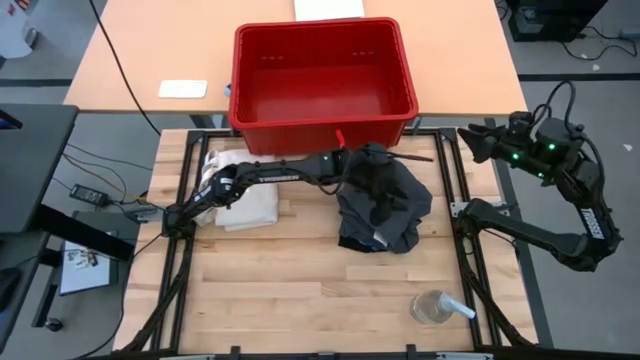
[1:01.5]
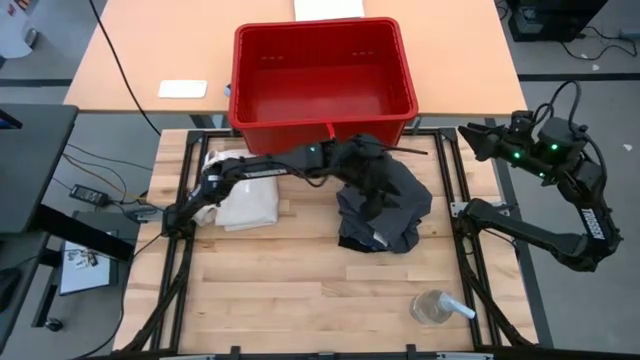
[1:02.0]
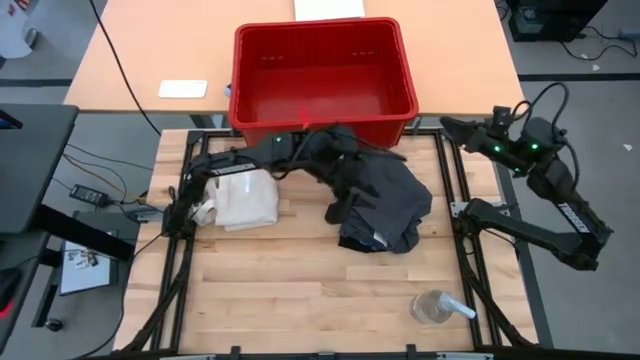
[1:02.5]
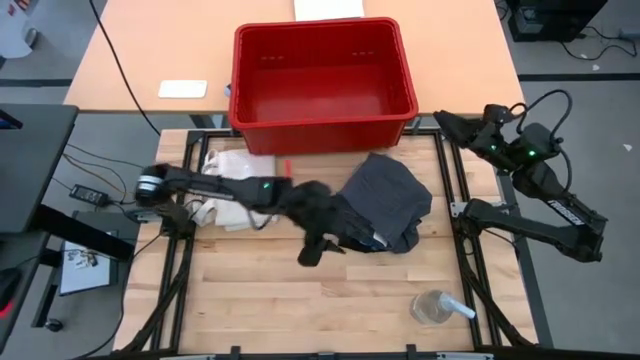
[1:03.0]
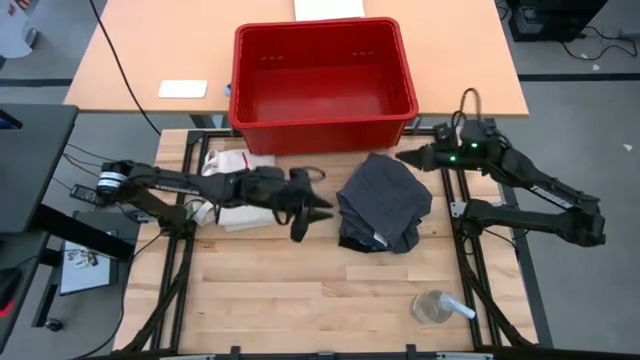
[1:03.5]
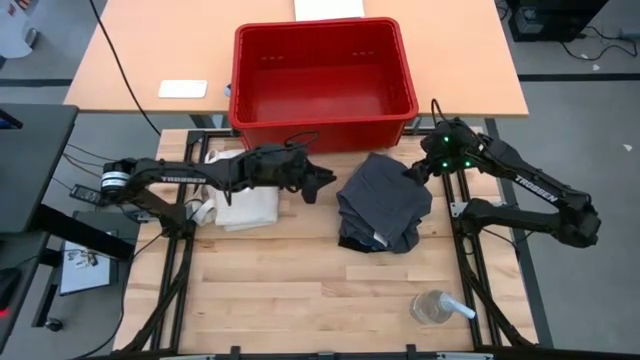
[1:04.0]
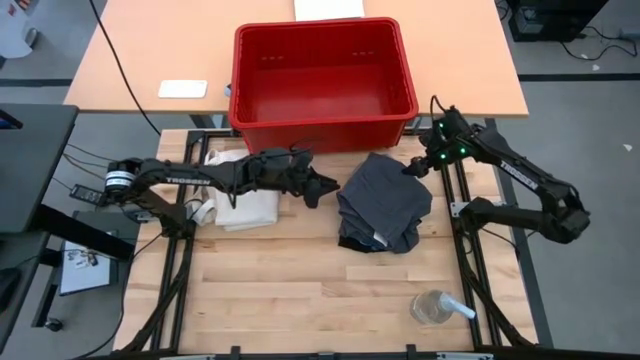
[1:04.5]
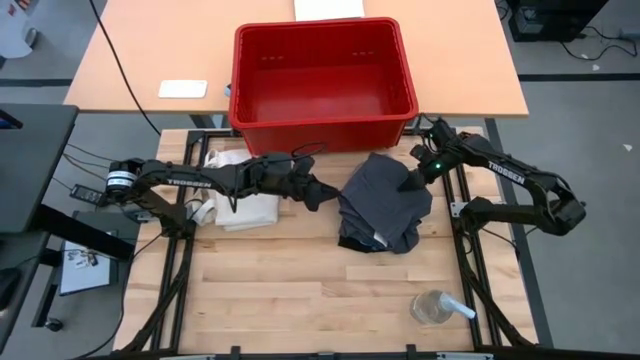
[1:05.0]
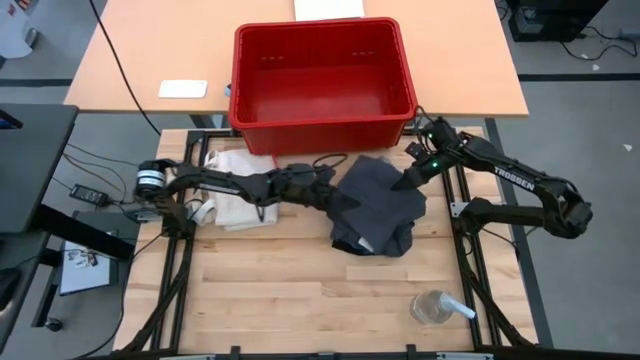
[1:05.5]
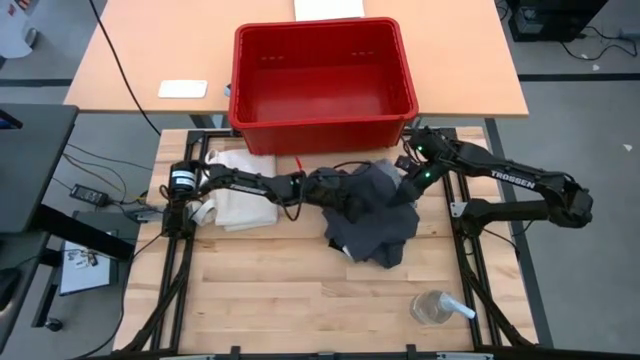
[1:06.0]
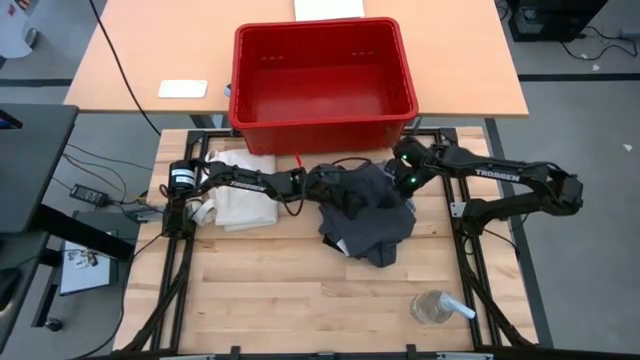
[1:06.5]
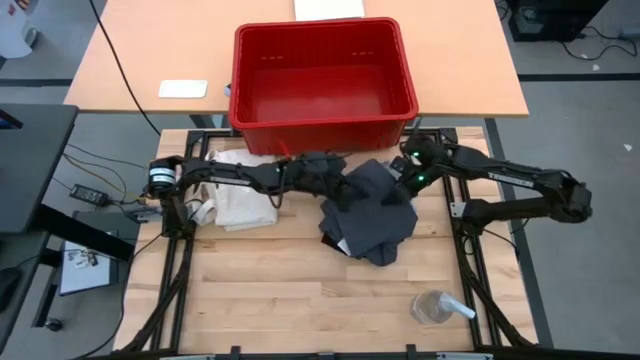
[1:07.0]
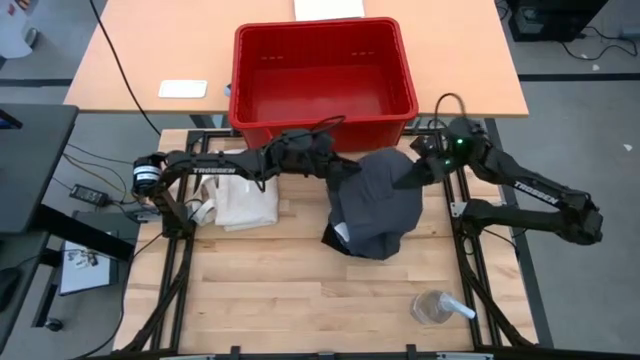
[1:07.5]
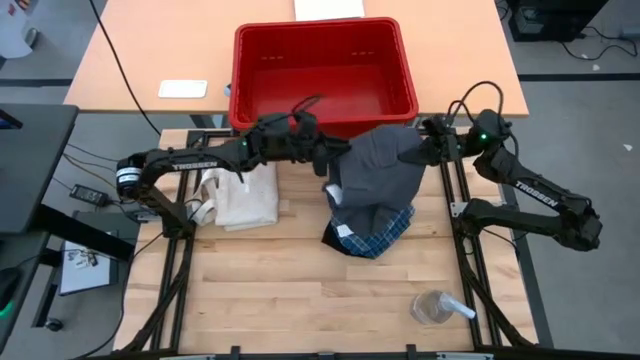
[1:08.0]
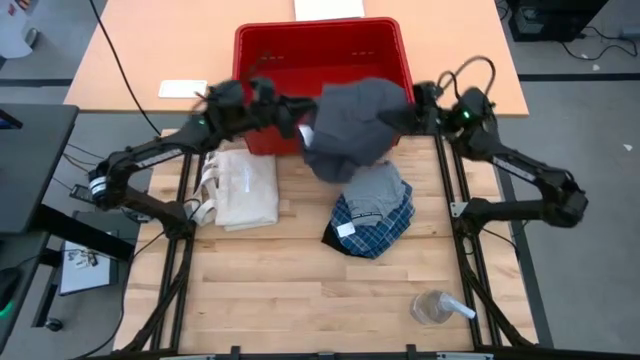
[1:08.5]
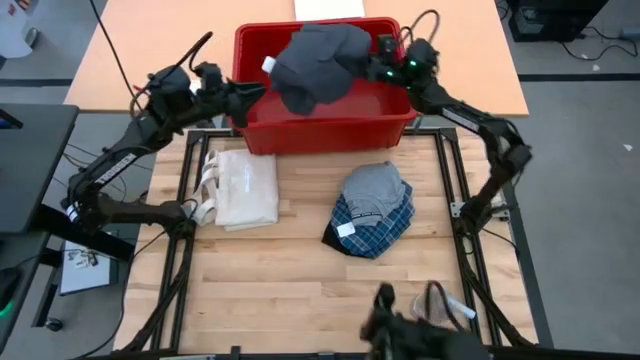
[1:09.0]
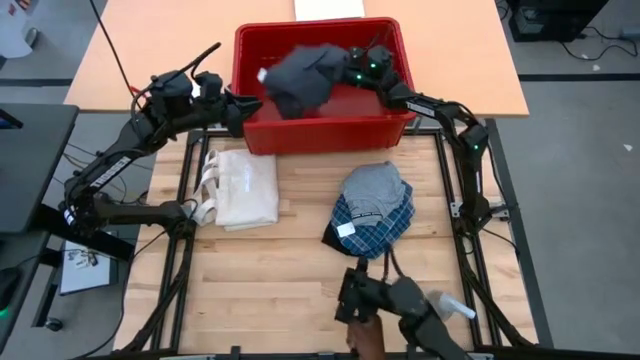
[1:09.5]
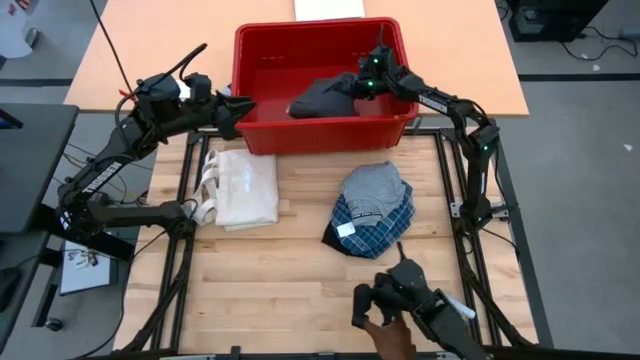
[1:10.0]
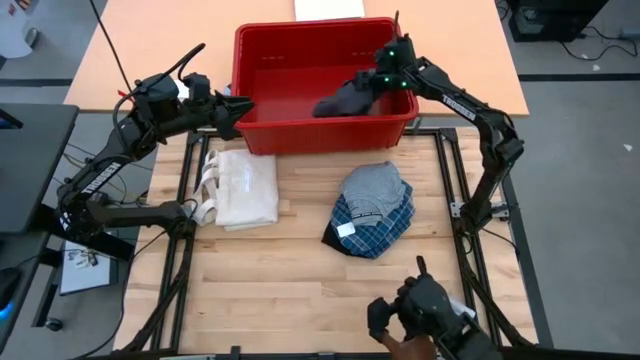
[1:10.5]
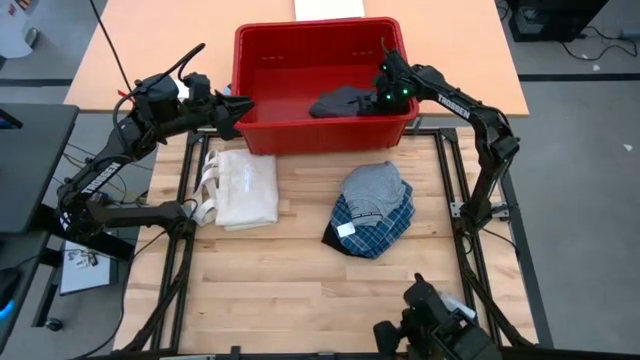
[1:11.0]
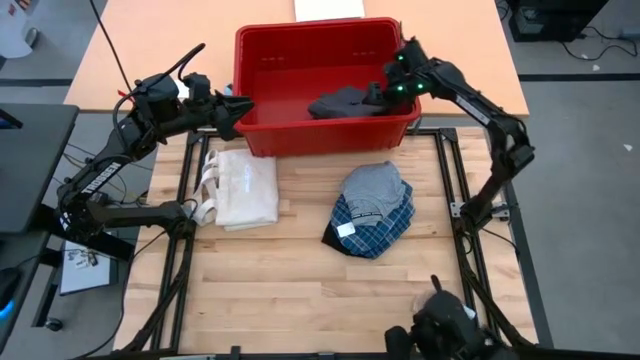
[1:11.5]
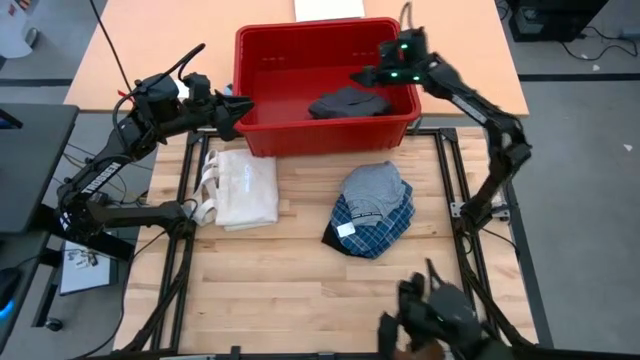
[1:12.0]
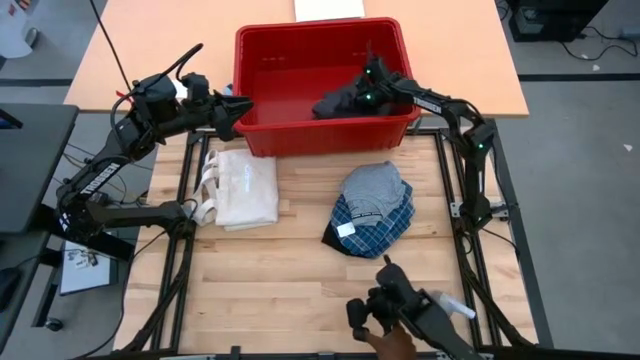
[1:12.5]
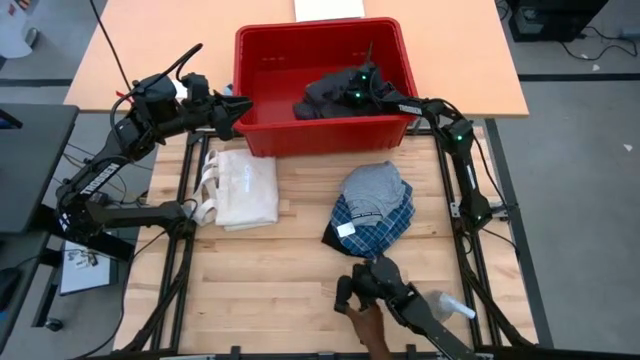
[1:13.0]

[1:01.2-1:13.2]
Task: Fold laundry
Put the gray shorts into the red laundry bin

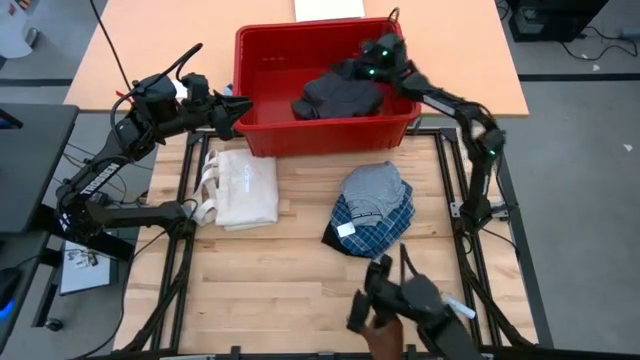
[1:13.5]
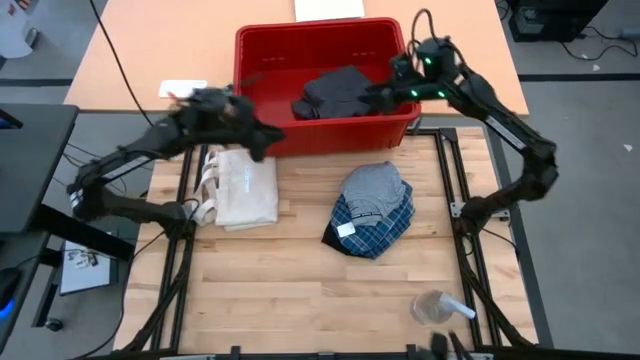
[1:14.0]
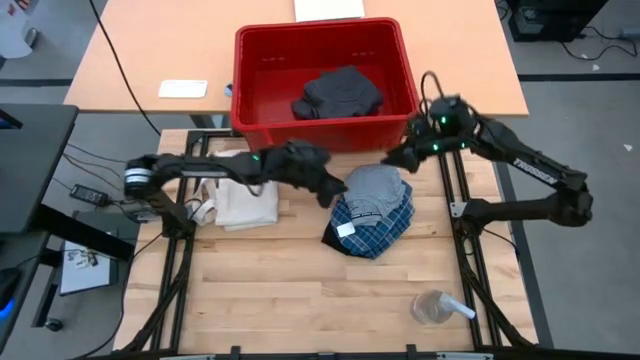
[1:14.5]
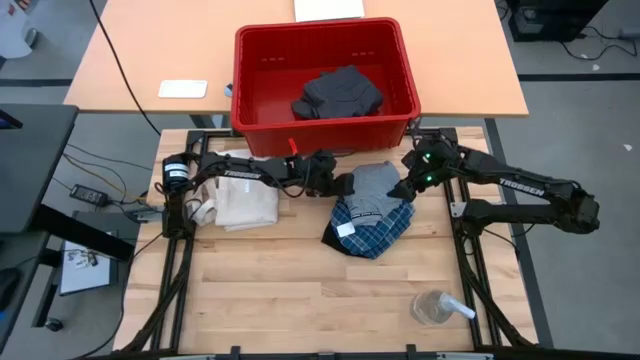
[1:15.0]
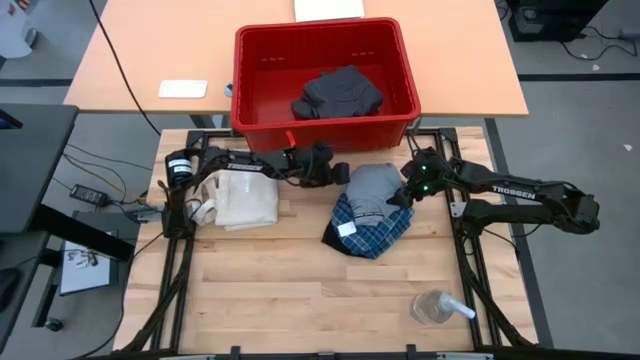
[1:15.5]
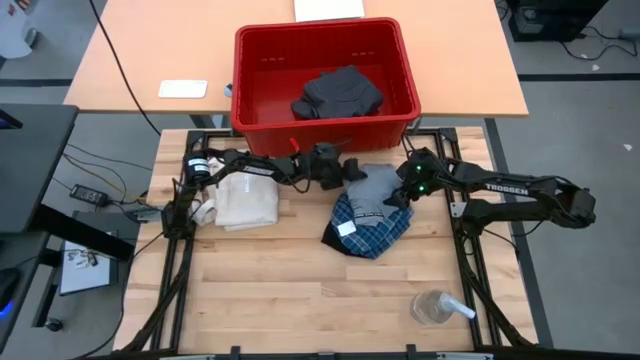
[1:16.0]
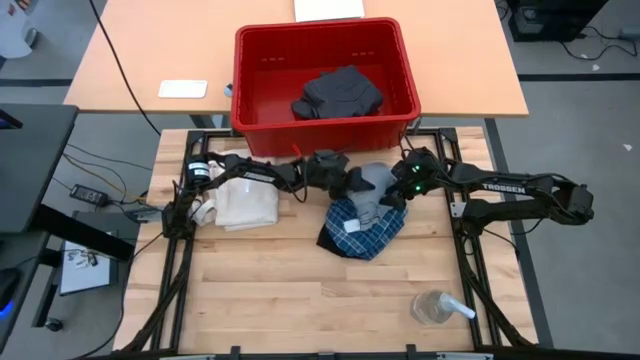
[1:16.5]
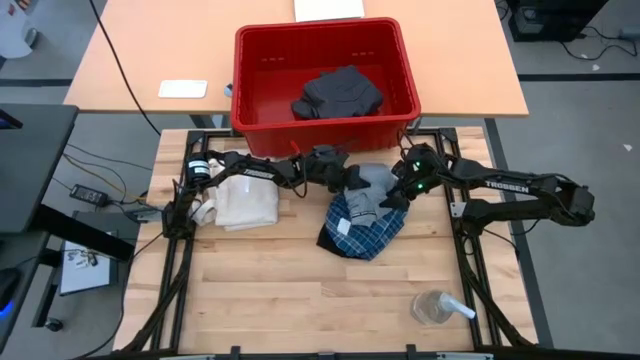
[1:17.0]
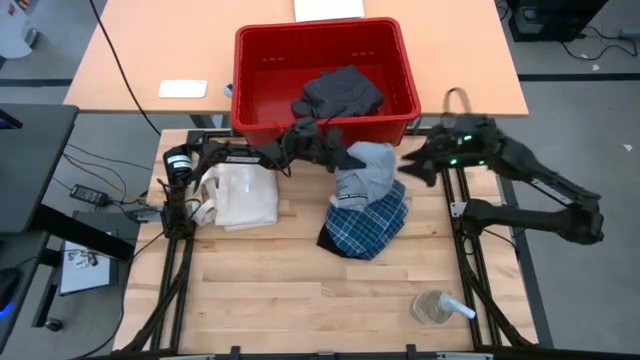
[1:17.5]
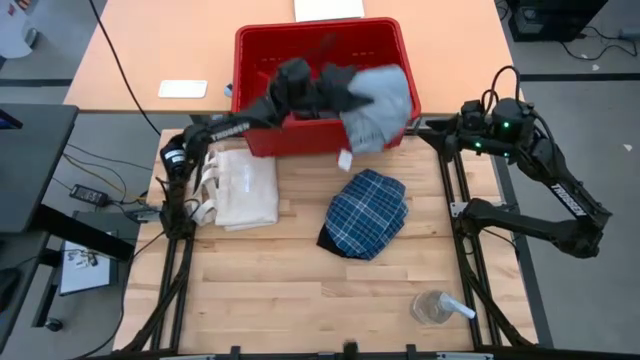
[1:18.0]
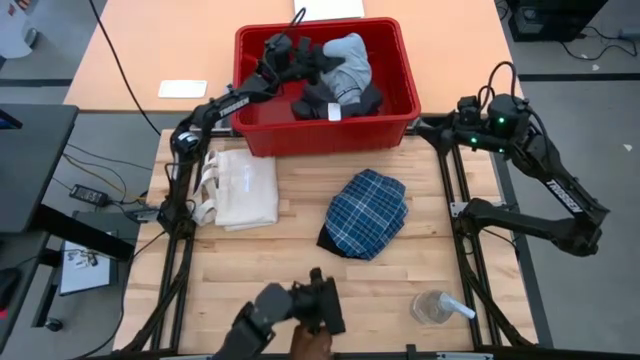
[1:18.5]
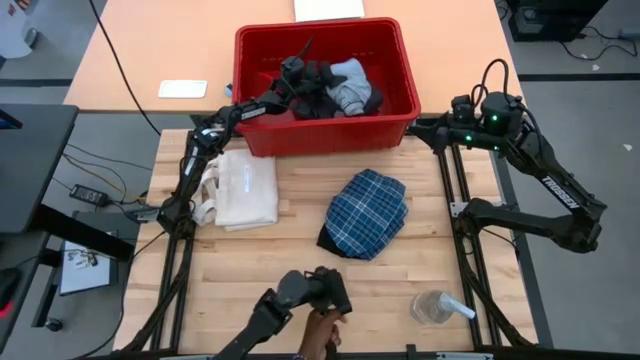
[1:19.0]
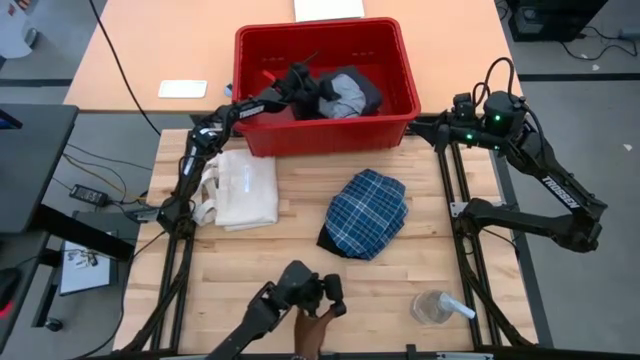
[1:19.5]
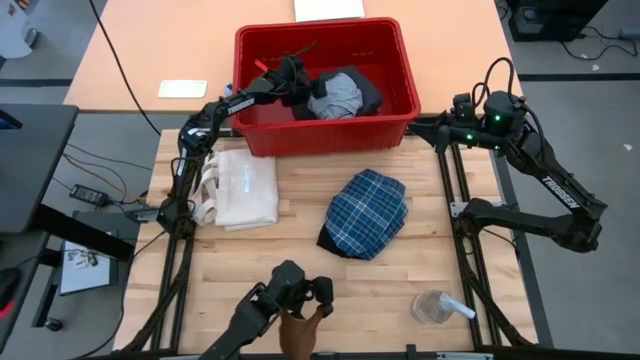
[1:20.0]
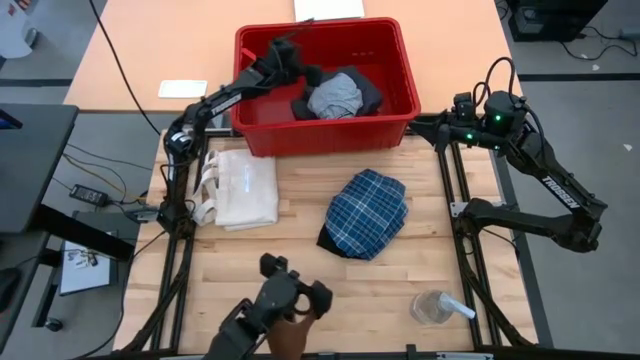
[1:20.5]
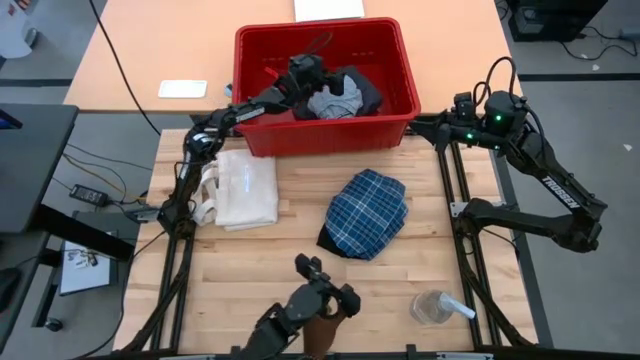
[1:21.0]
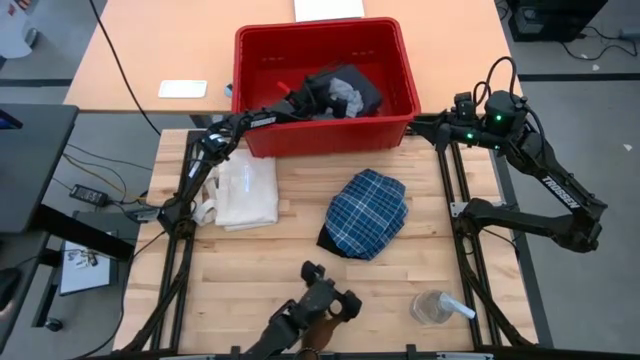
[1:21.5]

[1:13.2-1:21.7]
Put the gray shirt into the red laundry bin

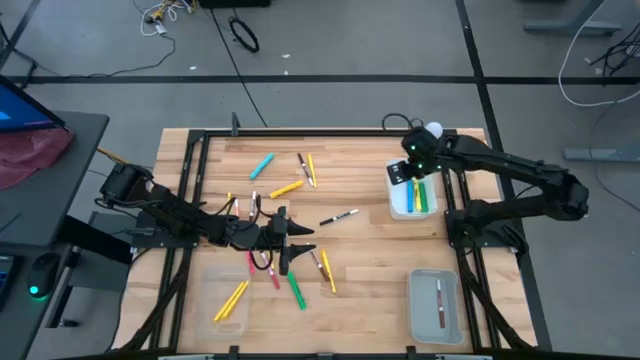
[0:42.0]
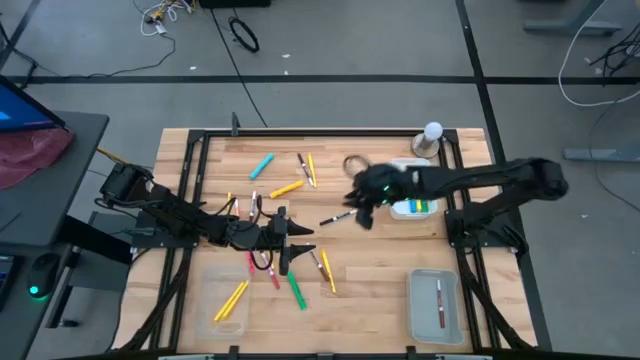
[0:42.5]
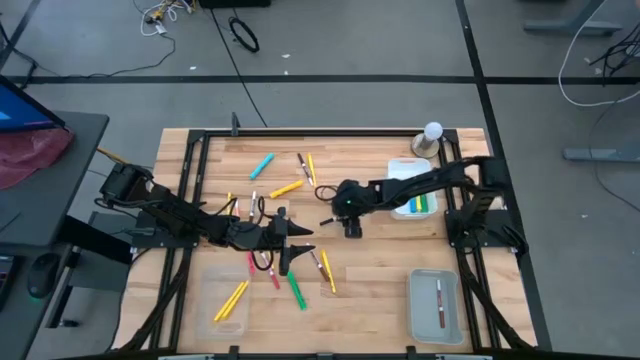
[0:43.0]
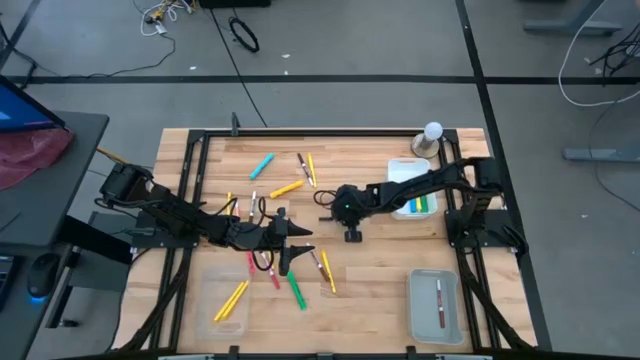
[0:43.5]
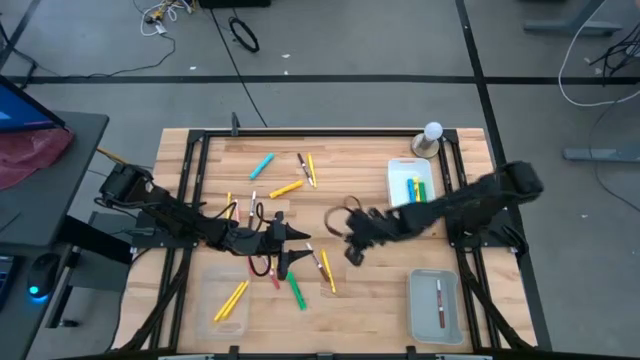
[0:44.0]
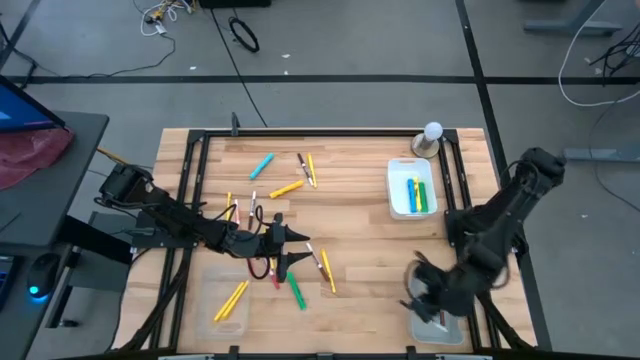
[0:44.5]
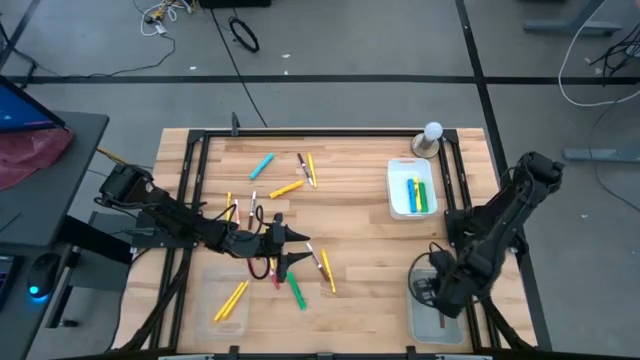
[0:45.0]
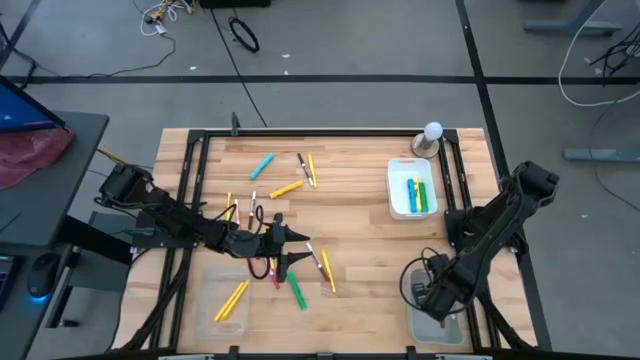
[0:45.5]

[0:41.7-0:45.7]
Task: Pick & Place Markers
Put the black marker into the gray bin
